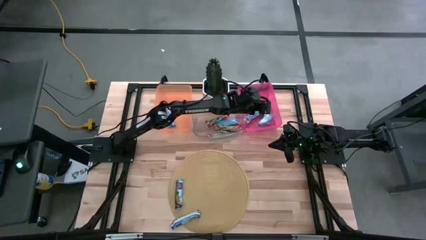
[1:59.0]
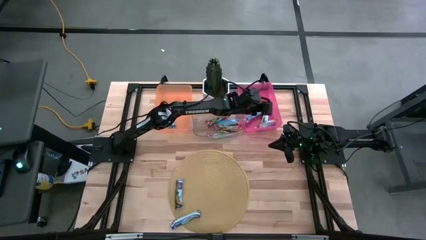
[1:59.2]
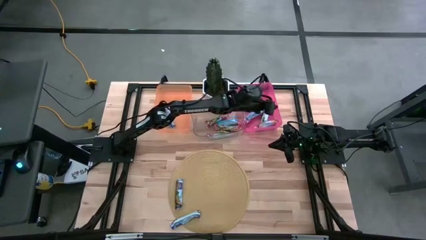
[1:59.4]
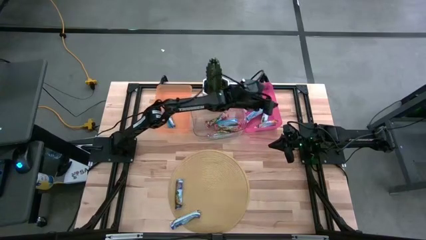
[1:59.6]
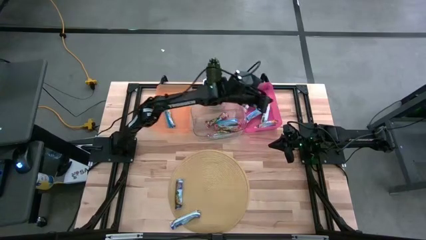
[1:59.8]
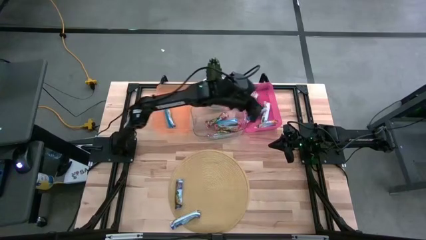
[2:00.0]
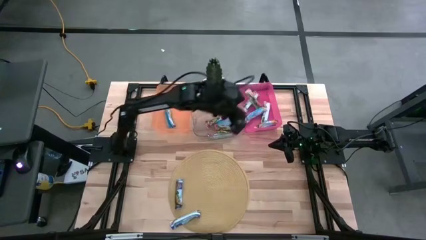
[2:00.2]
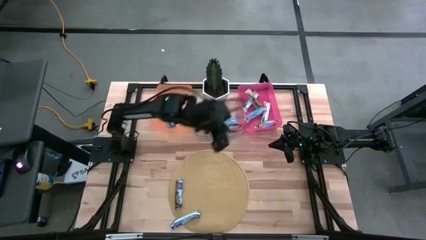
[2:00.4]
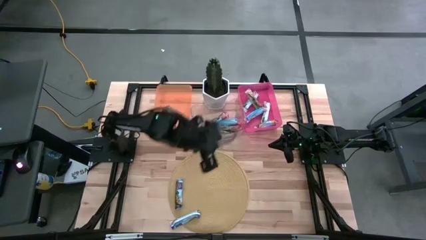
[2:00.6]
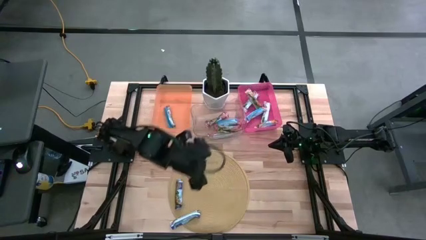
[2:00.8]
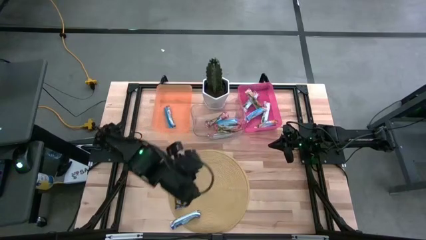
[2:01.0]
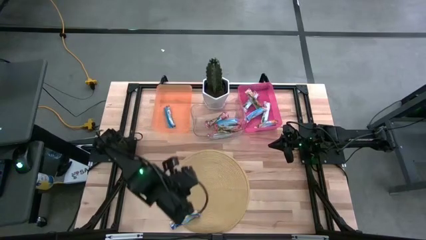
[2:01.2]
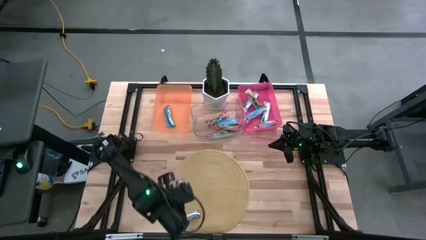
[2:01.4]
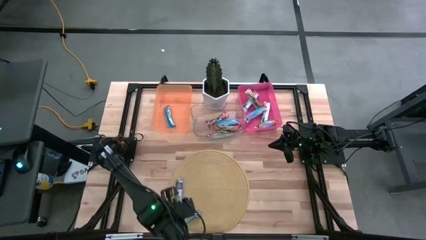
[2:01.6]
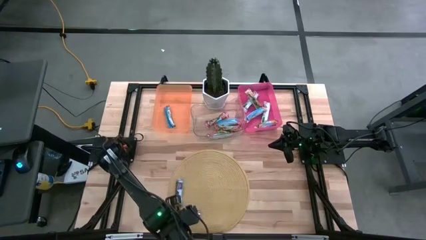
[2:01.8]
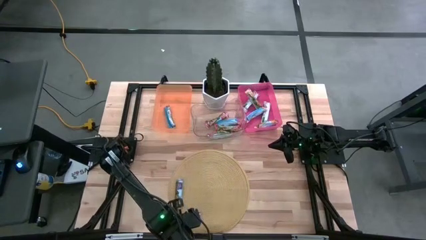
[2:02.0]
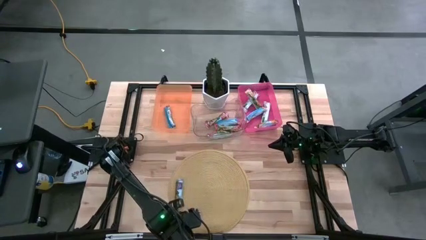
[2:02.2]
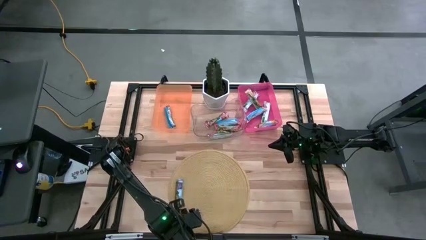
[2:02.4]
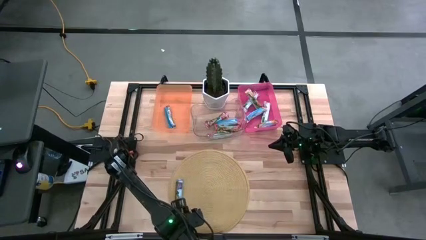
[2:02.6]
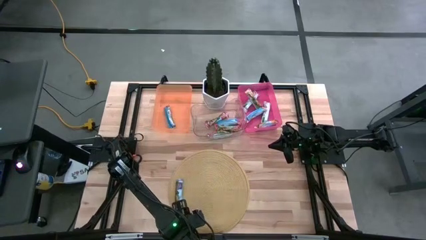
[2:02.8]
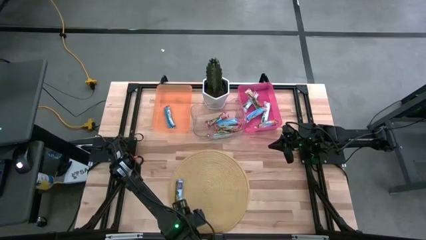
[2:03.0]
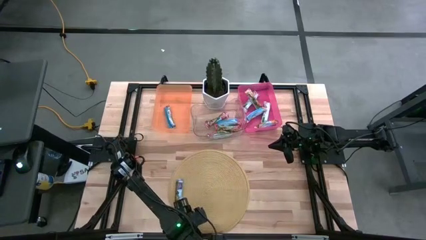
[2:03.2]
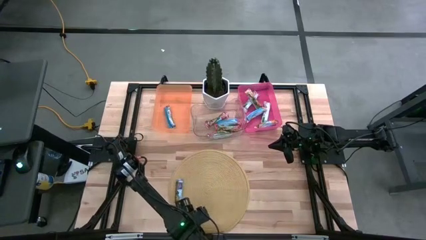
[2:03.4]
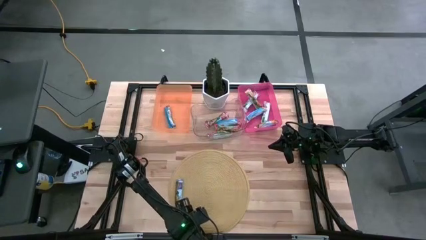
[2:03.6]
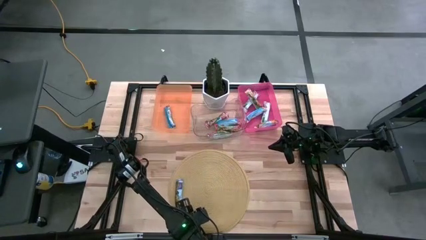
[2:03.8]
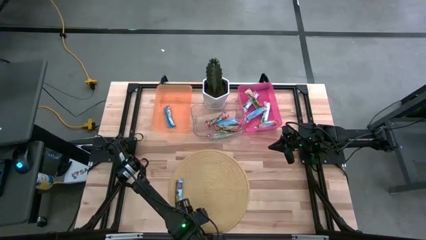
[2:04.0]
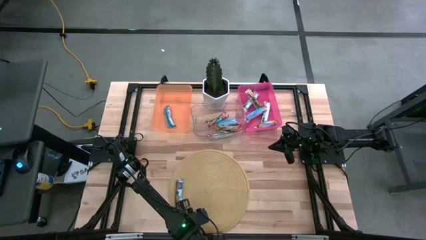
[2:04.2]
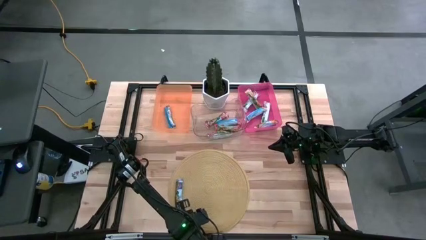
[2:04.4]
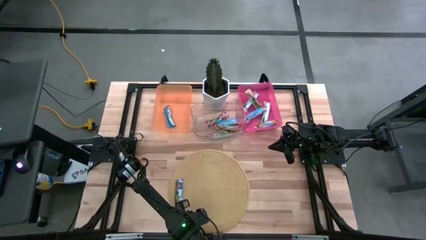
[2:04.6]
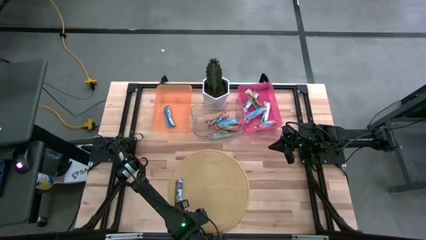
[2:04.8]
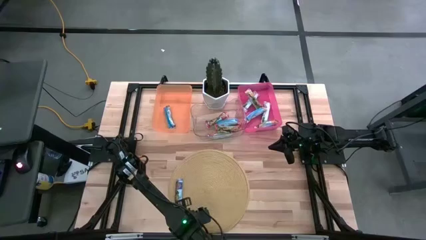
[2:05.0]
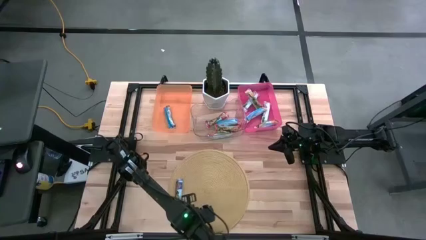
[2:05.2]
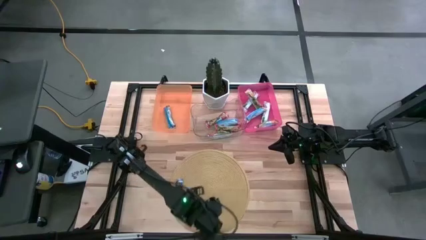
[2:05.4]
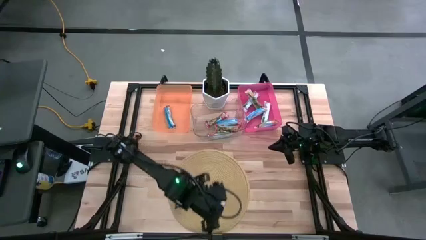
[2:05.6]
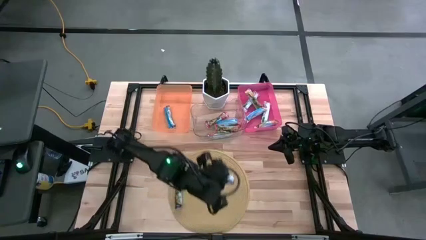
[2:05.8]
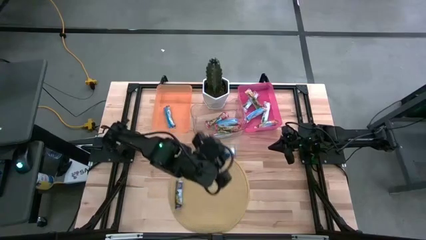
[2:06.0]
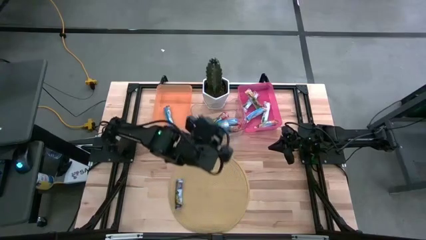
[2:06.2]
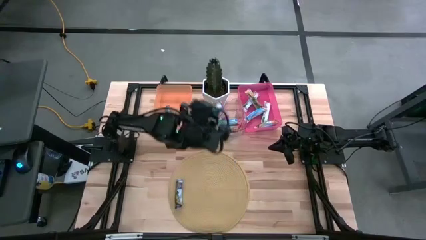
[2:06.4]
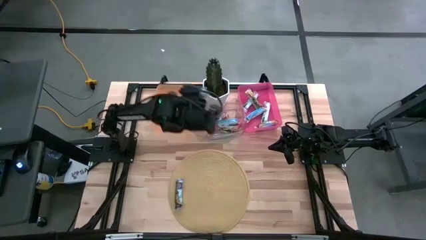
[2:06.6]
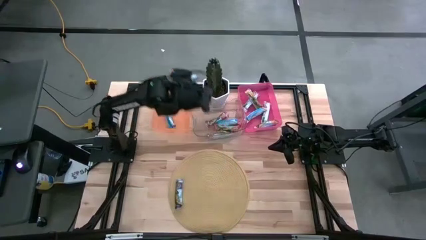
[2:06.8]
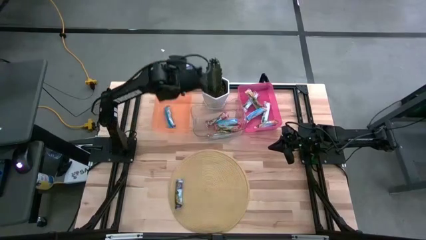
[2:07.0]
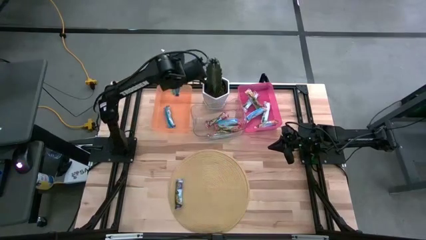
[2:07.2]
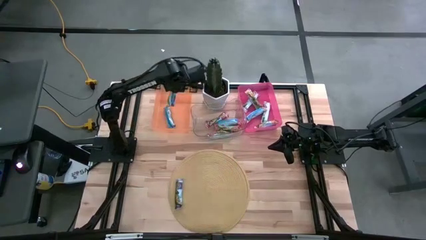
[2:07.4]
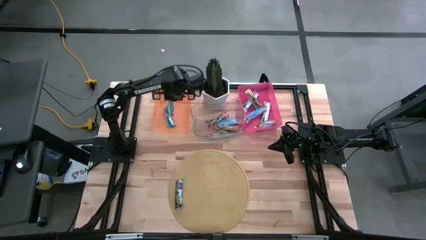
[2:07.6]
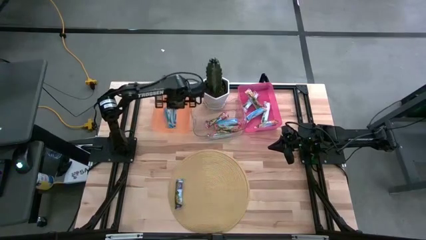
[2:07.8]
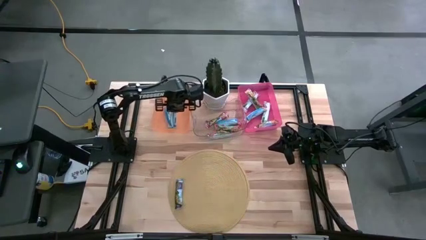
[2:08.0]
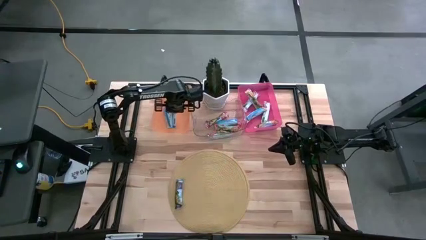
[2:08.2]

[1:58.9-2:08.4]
Task: Pick and place Granola Bars by type
Put the blue granola bar into the orange bin

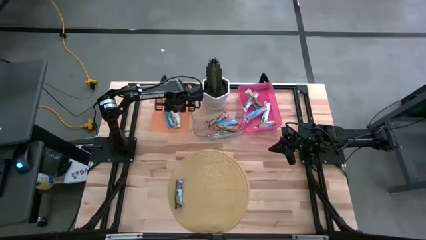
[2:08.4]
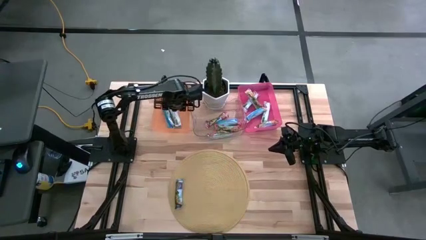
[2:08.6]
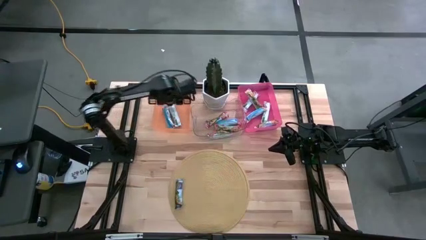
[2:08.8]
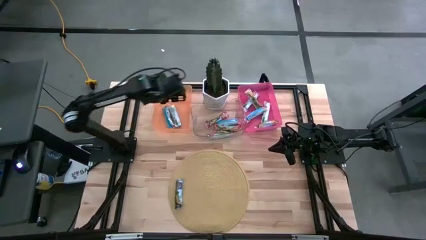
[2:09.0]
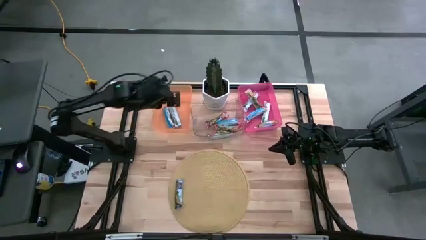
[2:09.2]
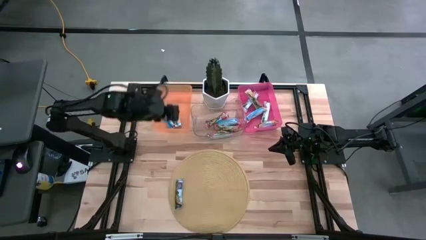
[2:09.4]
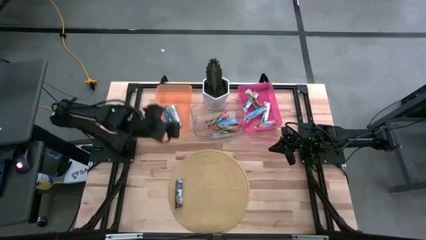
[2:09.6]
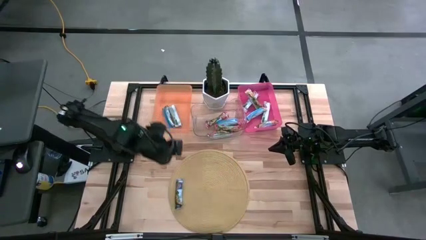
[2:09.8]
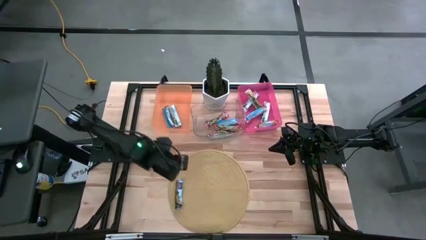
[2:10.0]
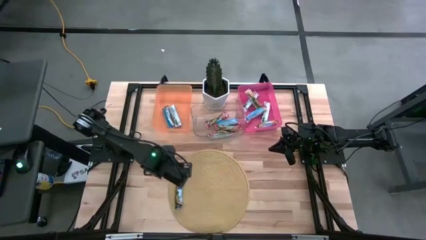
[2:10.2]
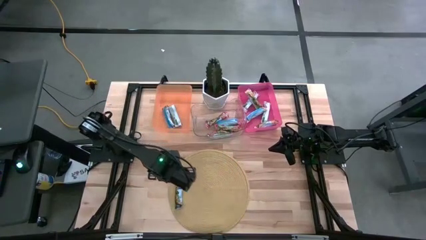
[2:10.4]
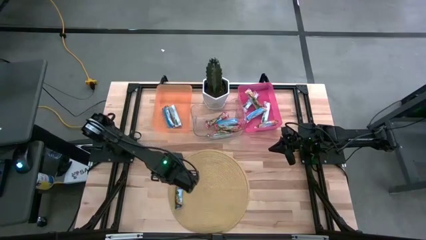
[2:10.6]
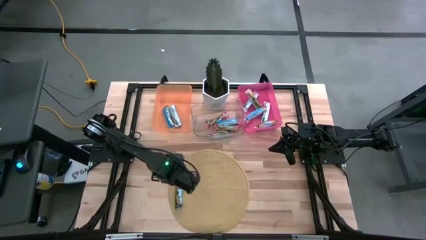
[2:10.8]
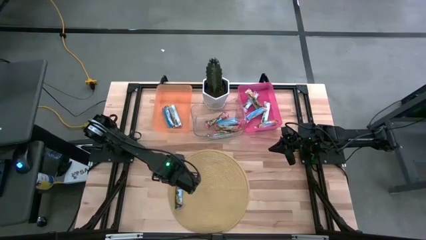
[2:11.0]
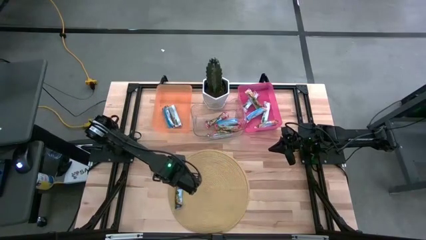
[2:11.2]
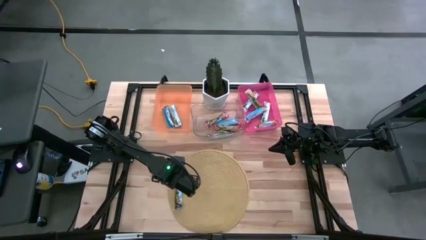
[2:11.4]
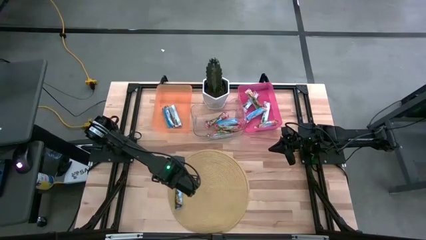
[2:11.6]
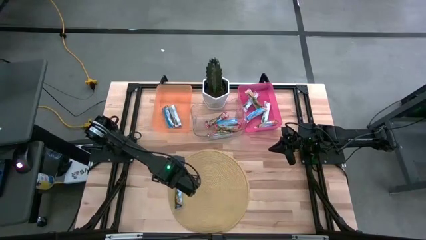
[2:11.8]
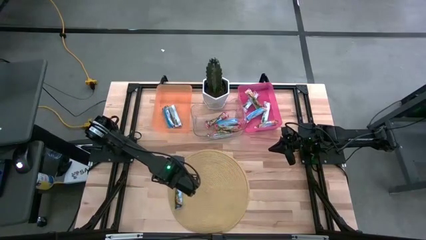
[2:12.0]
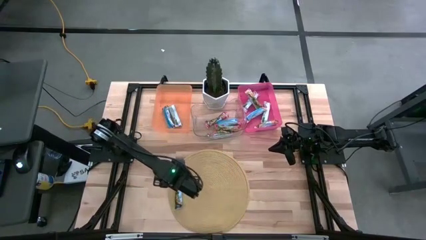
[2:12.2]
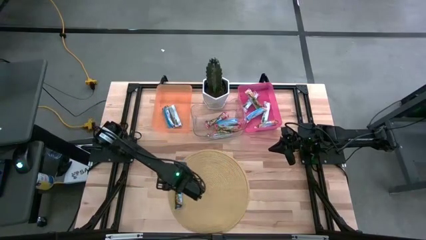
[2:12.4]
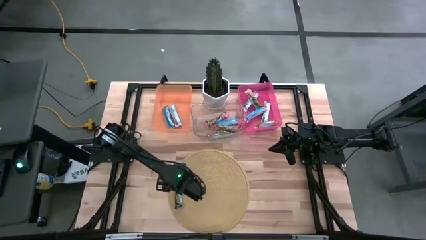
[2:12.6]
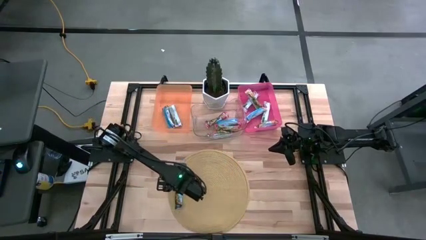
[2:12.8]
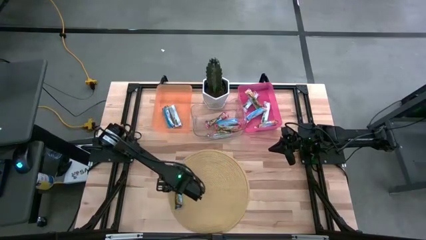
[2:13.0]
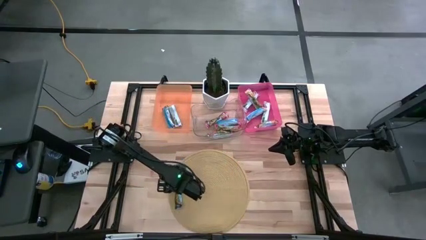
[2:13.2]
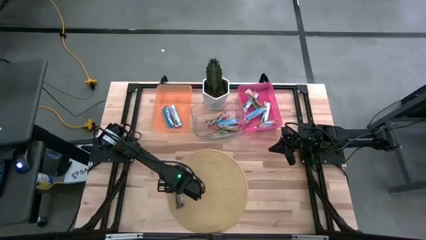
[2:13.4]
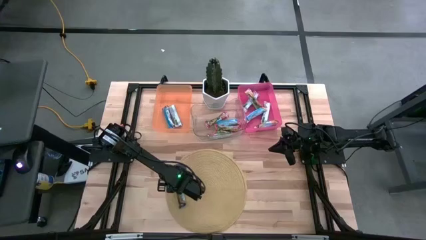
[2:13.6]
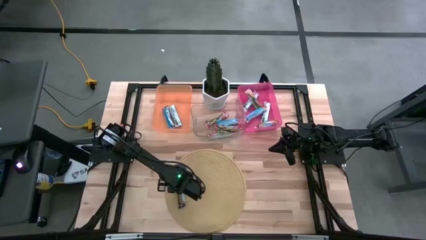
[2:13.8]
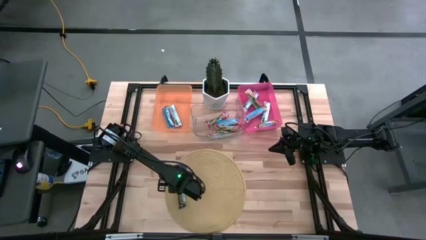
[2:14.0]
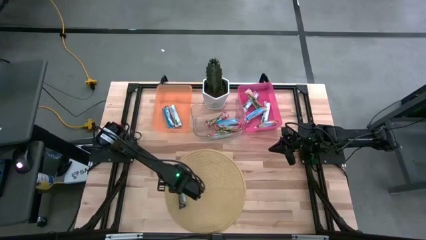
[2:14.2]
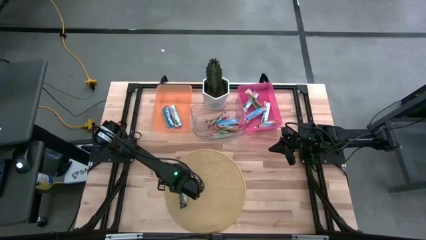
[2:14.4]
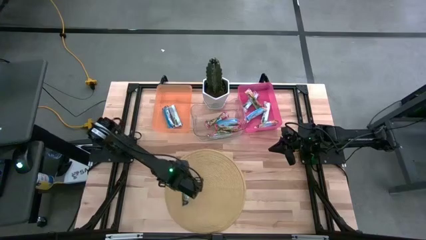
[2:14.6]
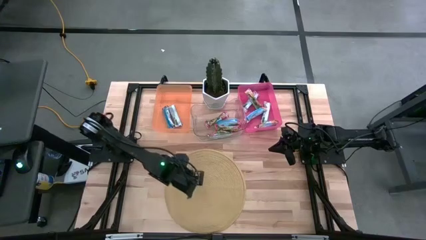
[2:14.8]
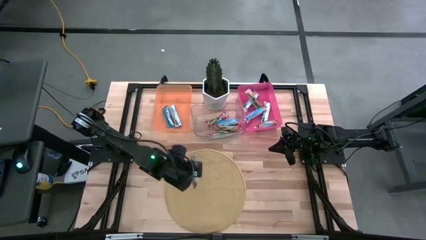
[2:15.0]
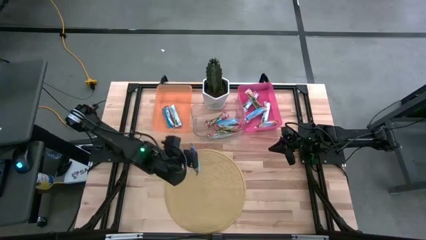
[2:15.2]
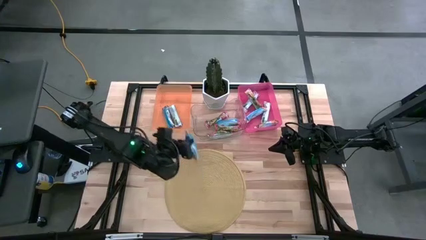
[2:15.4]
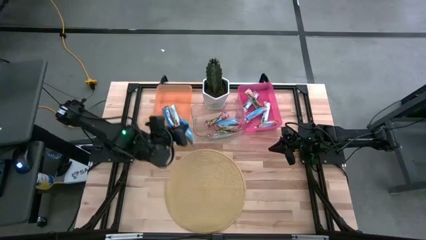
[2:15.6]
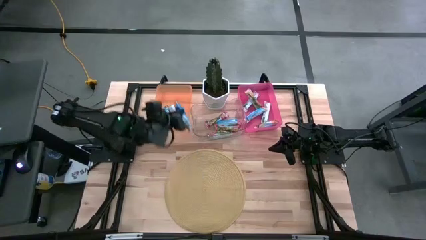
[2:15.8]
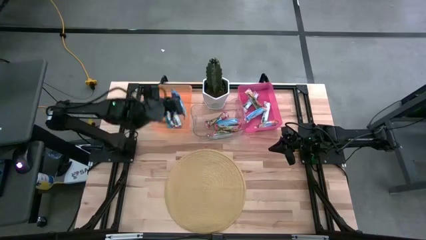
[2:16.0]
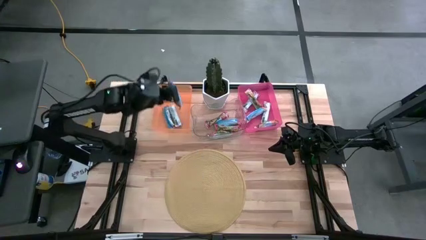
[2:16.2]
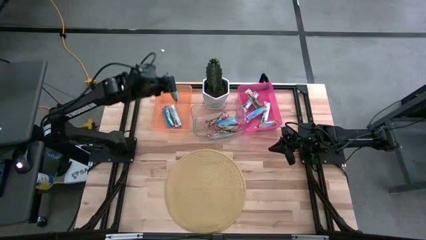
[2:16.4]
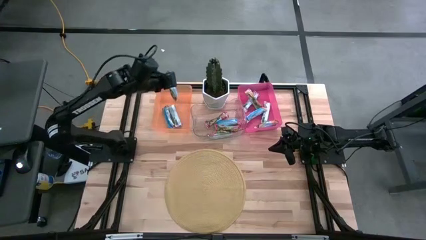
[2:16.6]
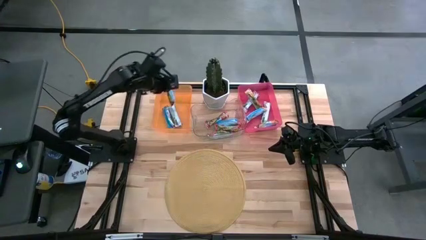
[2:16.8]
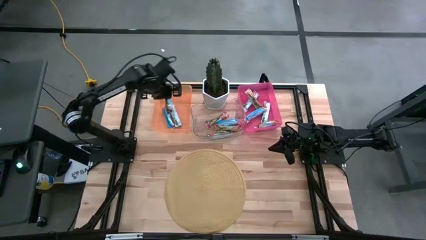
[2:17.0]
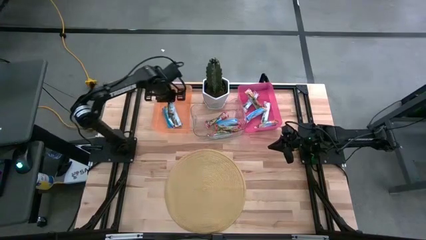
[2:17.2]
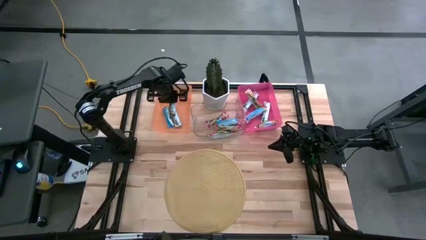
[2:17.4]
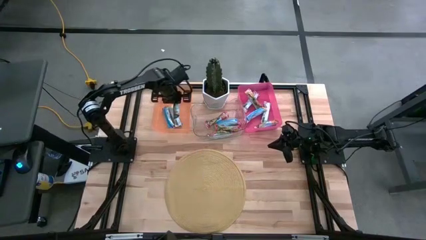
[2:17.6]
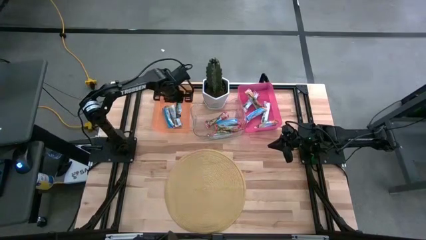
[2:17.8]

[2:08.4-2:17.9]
Put the blue granola bar into the orange bin
